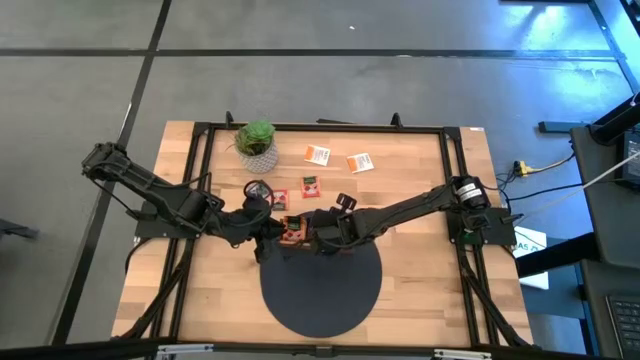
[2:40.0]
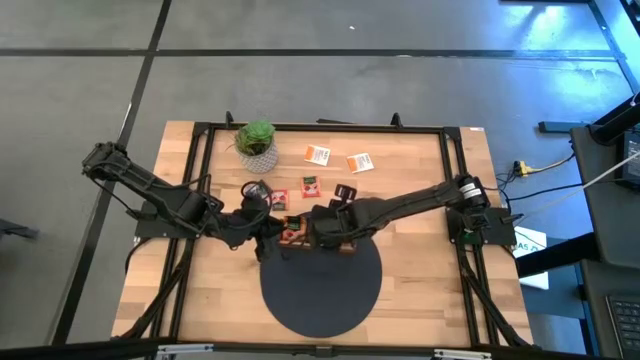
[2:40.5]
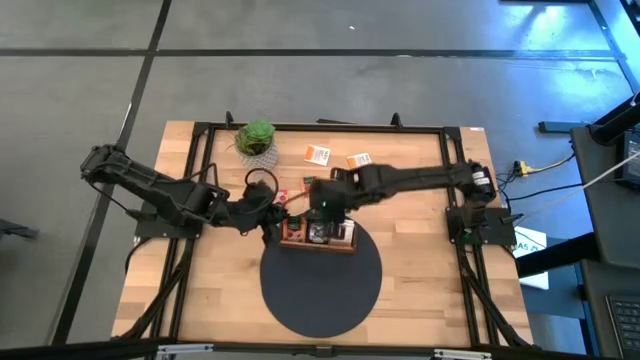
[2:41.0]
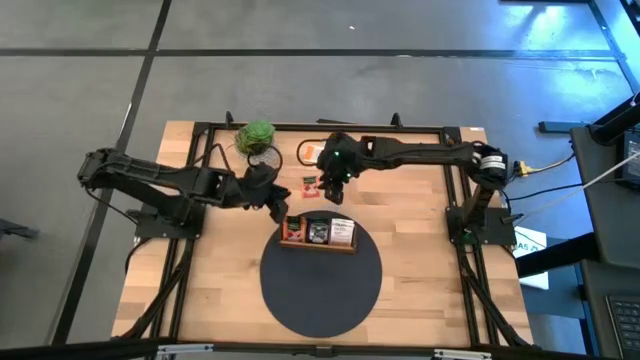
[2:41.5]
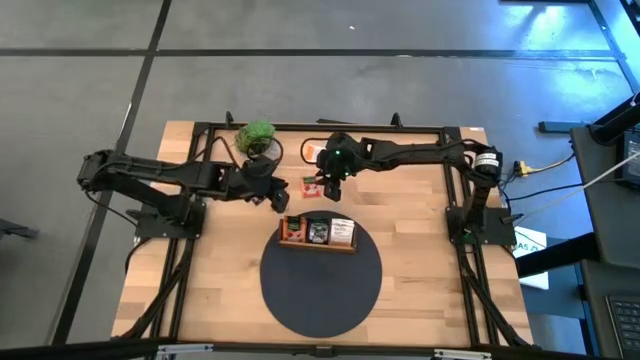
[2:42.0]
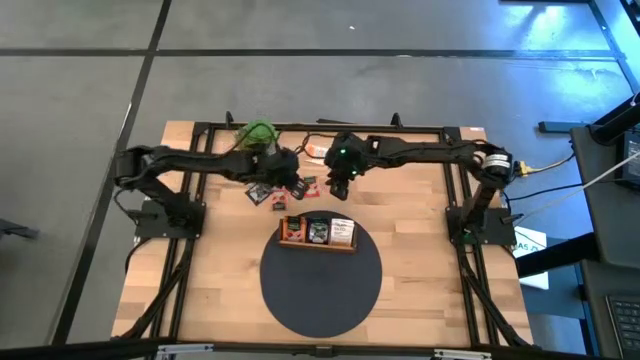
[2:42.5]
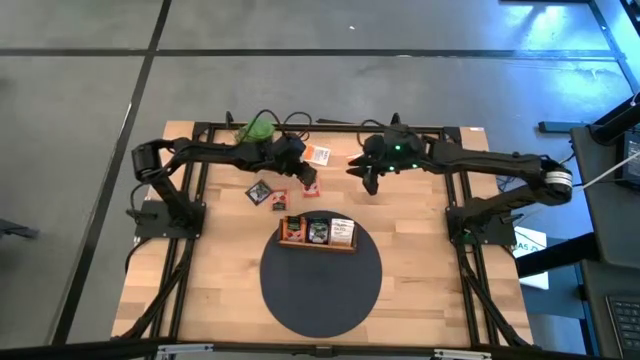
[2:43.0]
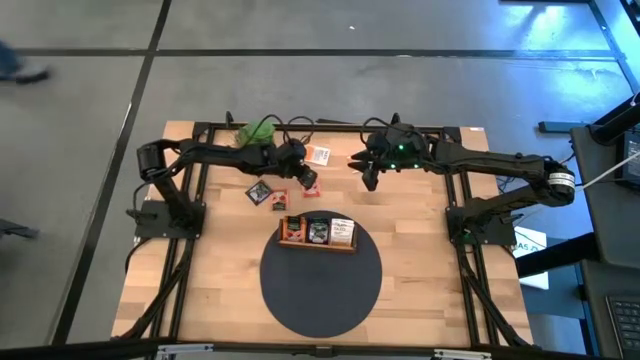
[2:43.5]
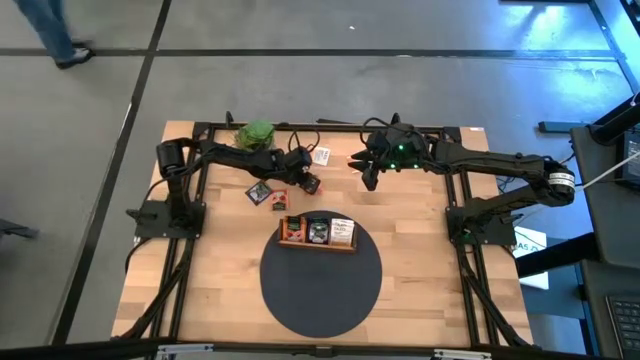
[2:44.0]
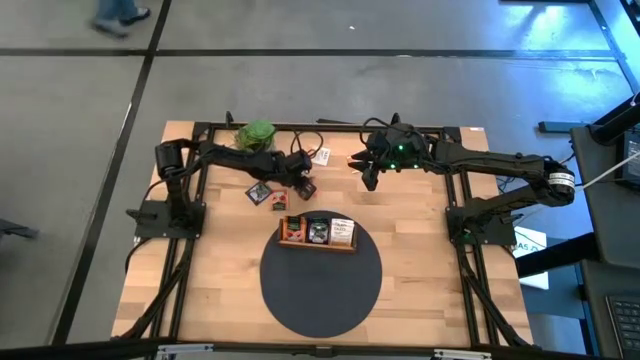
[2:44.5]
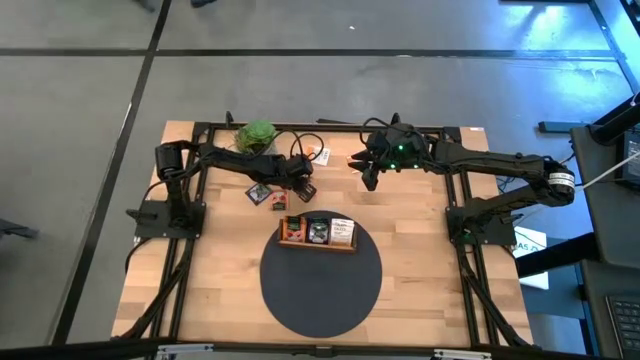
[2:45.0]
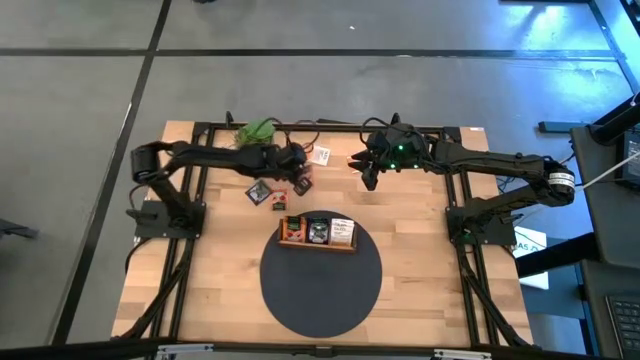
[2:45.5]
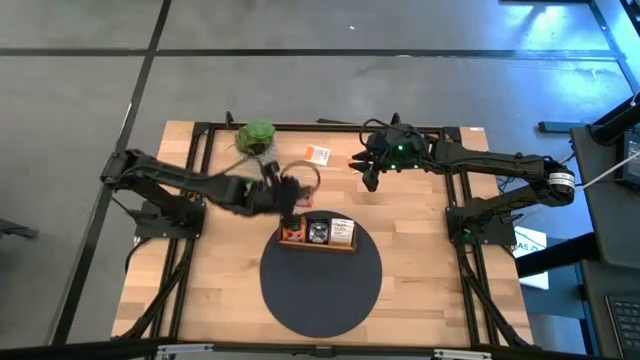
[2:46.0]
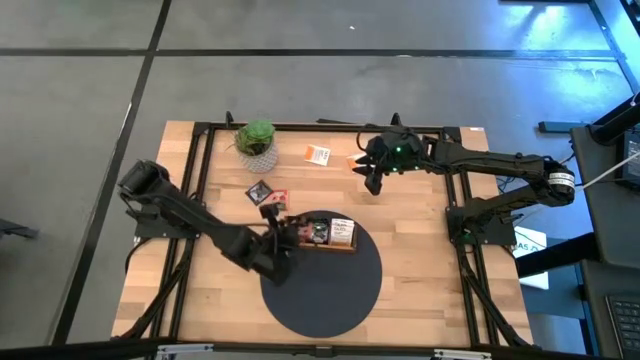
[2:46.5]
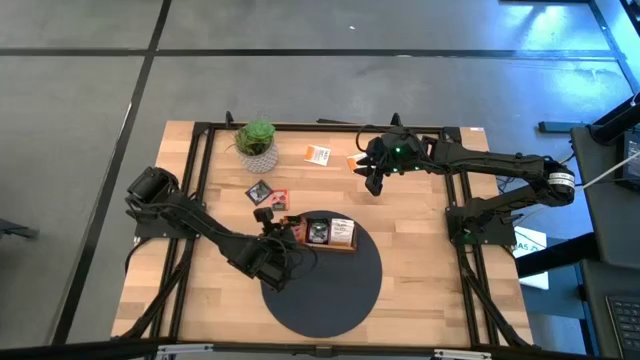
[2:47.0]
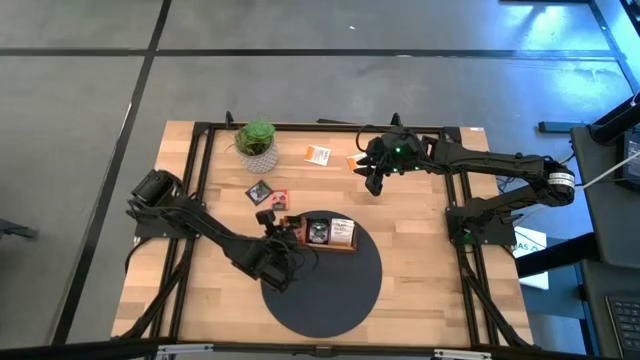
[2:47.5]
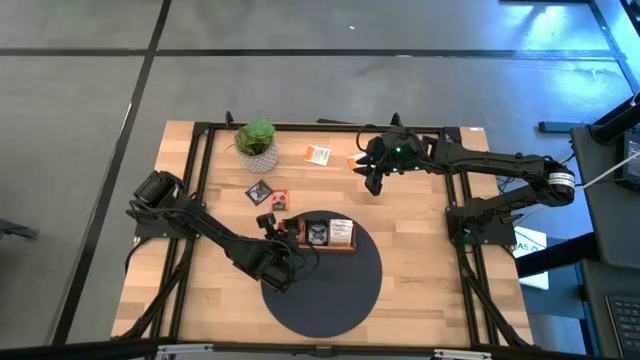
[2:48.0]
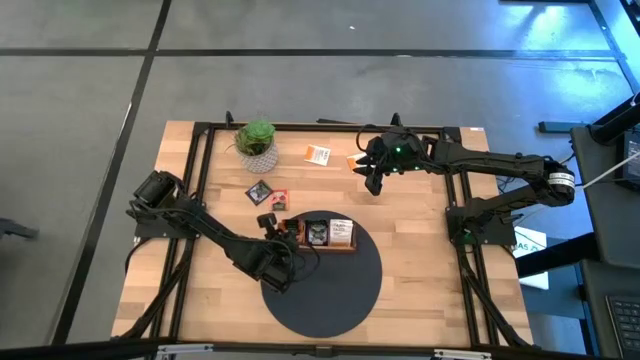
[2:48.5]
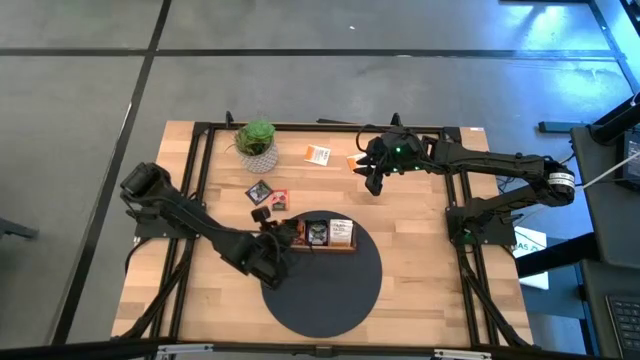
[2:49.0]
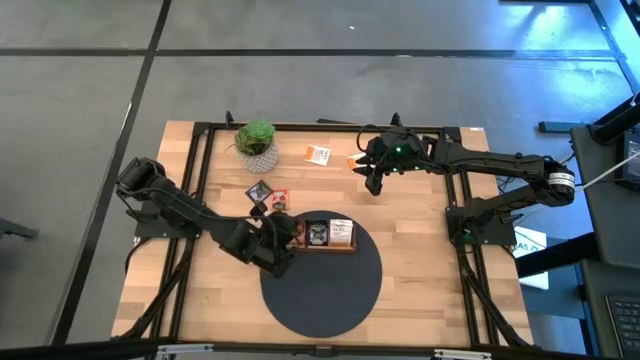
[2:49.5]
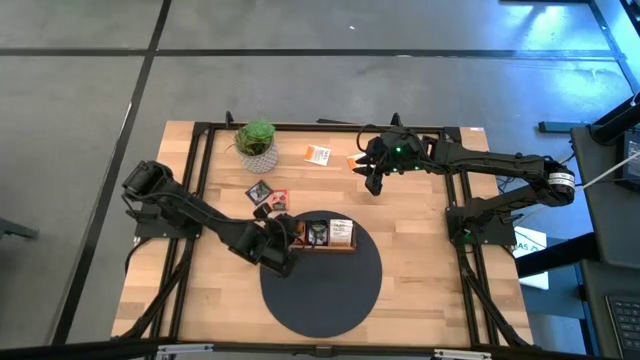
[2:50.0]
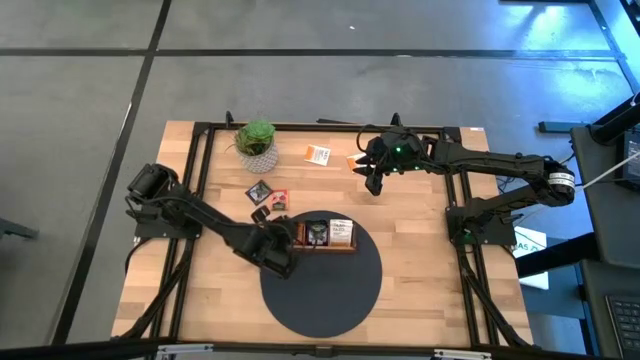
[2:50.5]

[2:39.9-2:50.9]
Task: Pick & Place Tea
Put the right orange tea bag into the left slot of the wooden organizer

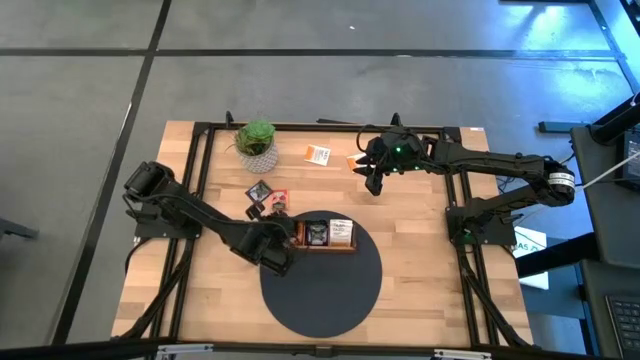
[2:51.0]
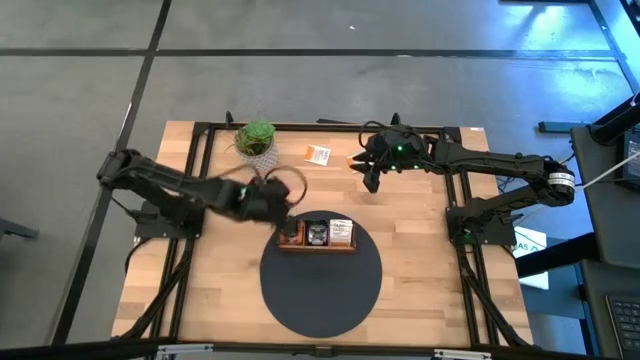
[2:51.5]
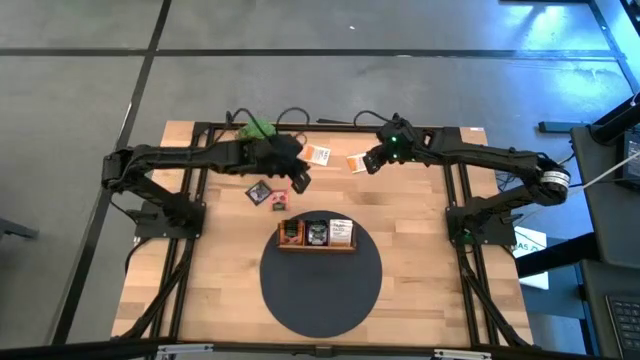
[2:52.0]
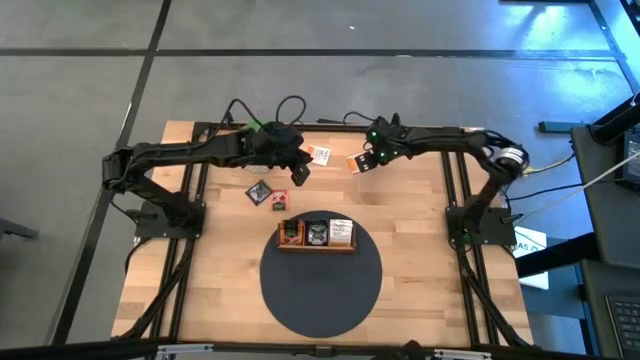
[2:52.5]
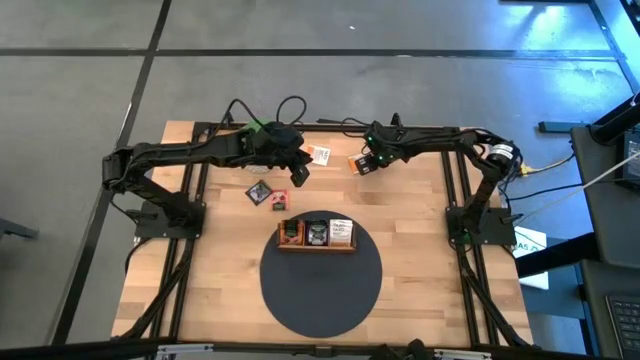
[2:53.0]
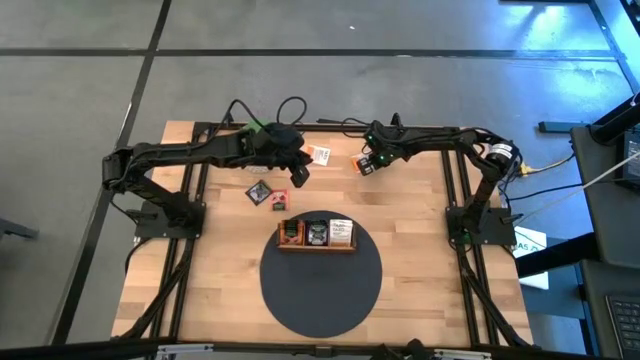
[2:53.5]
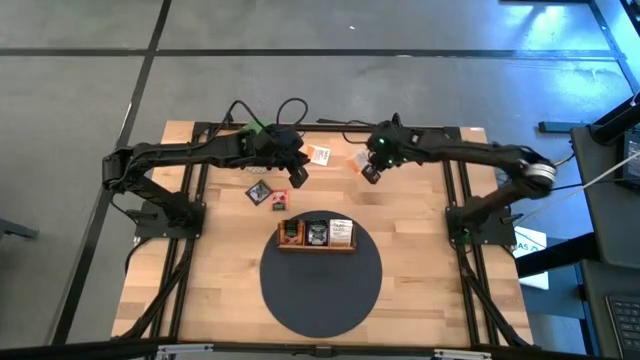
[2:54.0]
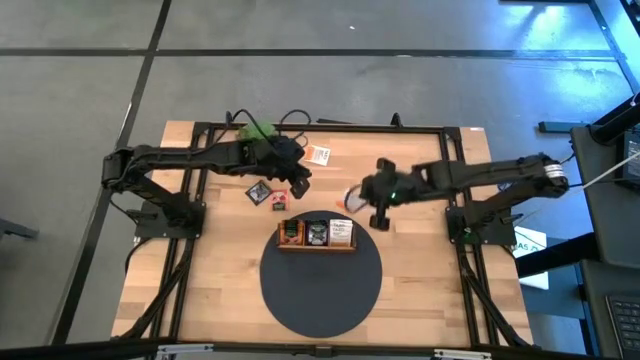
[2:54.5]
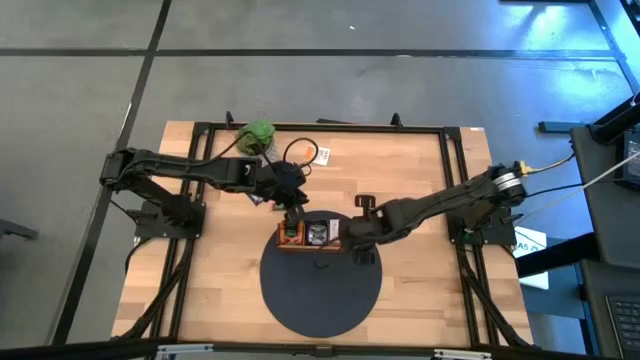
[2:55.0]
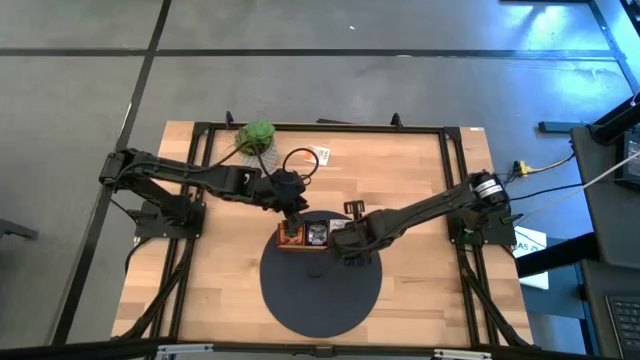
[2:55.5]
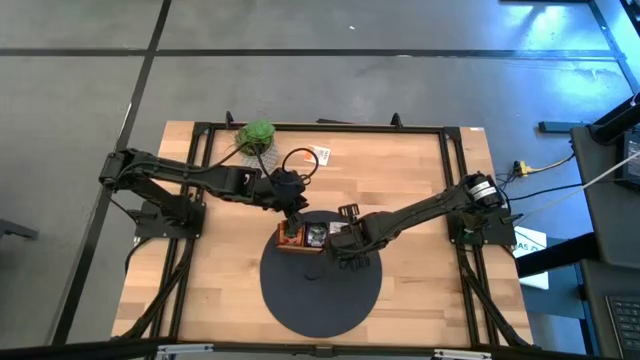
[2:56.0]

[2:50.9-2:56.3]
Put the right white tea bag into the right slot of the wooden organizer

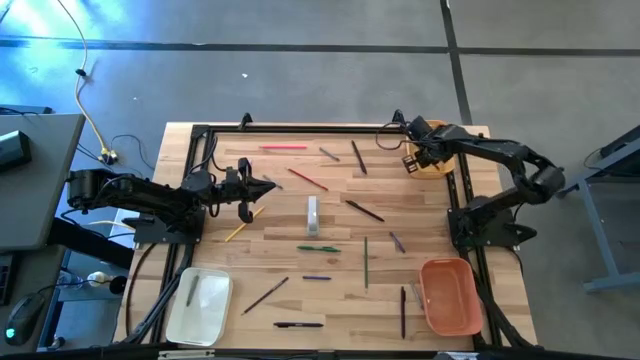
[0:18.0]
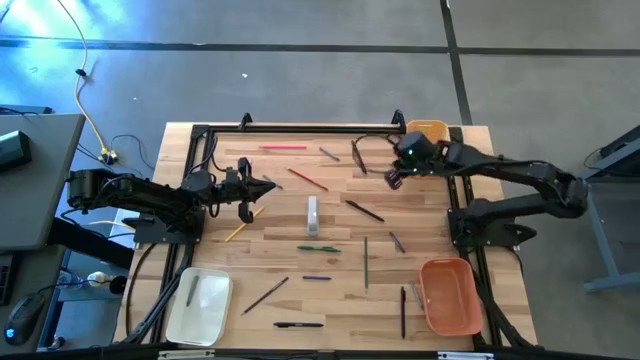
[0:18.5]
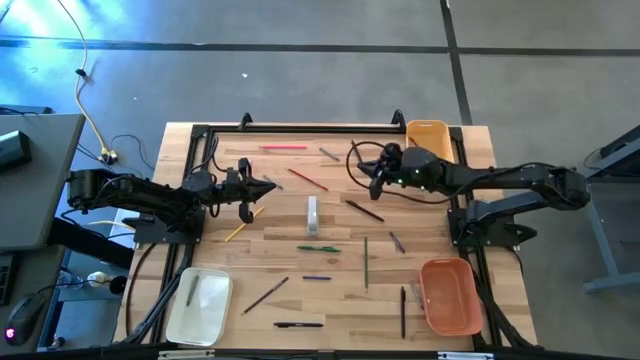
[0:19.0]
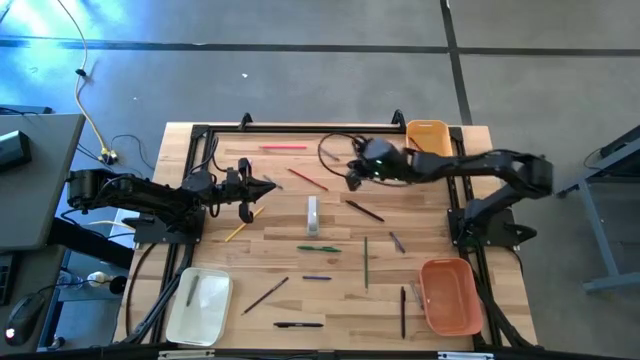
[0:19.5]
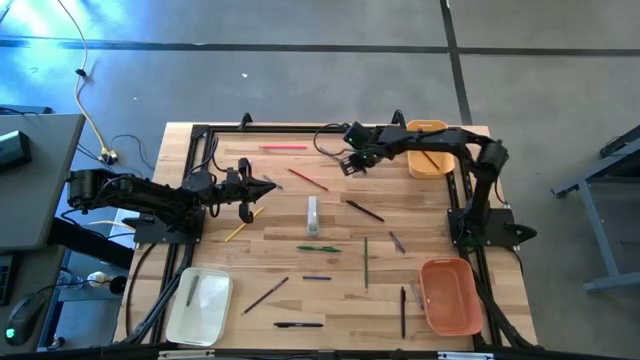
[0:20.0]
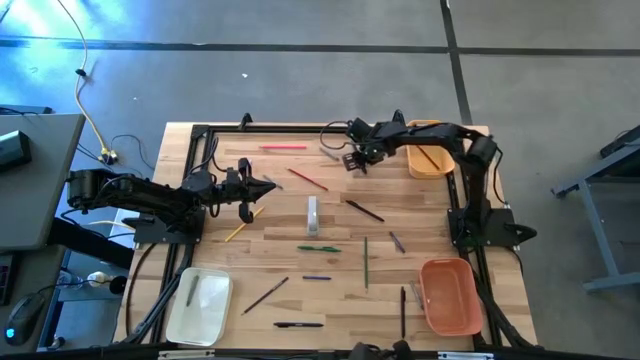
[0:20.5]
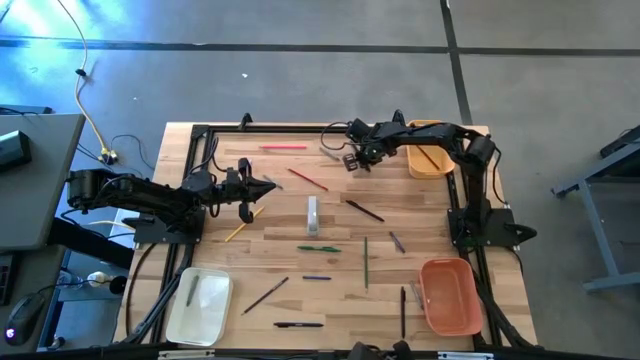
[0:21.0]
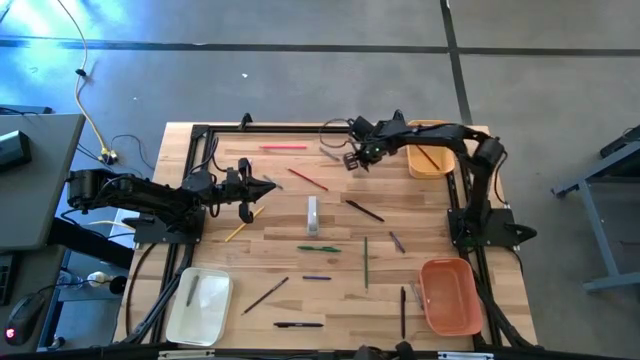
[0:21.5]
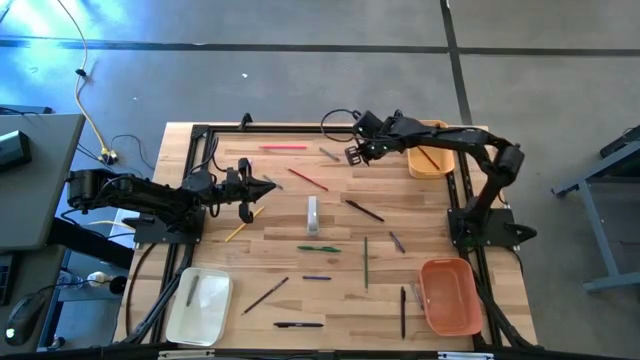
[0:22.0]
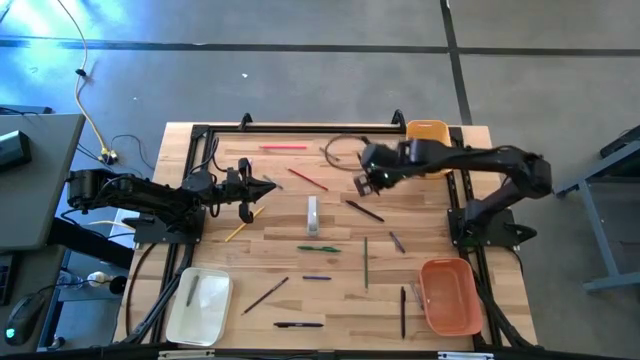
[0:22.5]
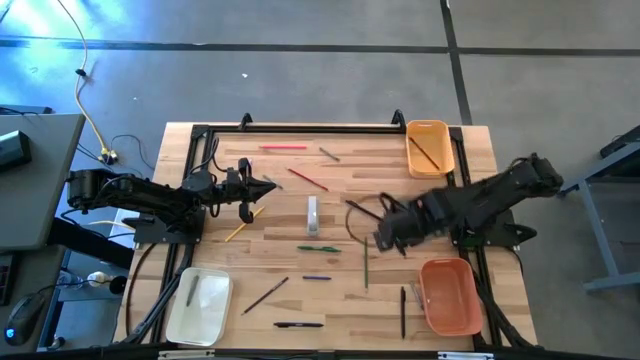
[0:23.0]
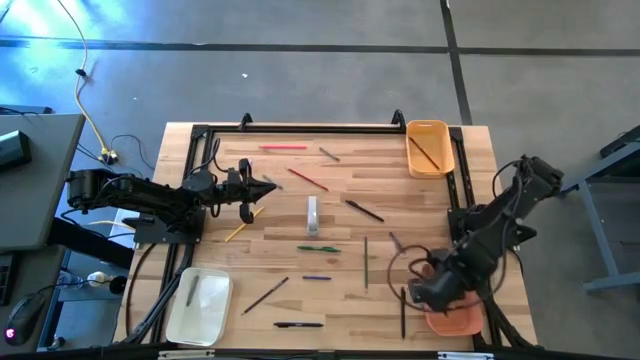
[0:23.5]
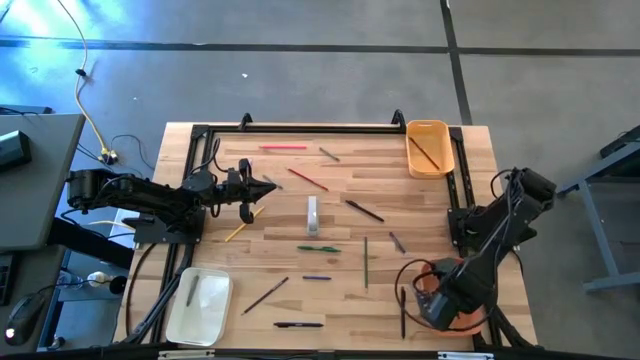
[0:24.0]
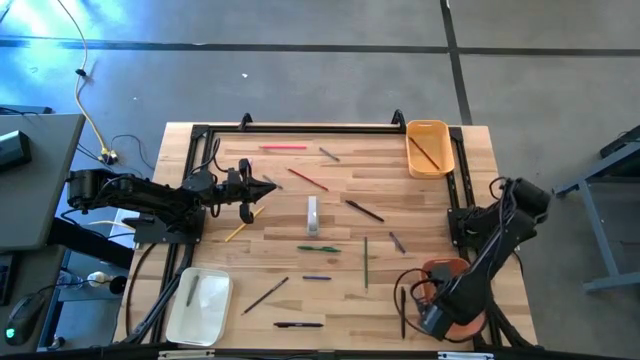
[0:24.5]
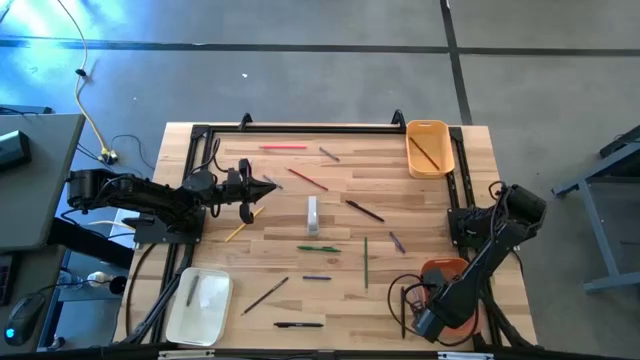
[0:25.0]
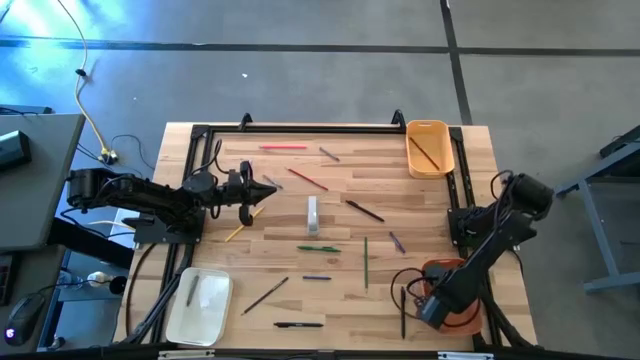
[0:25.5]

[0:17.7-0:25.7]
Task: Sort crayons/erasers/pens/pencils in bins
Put the black pen into the orange bin
